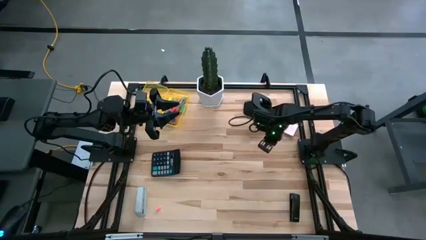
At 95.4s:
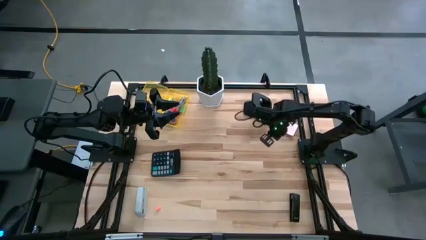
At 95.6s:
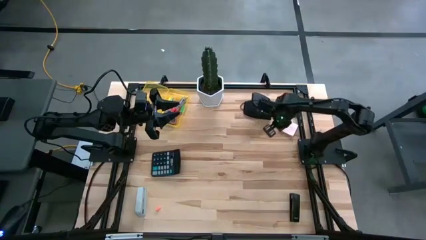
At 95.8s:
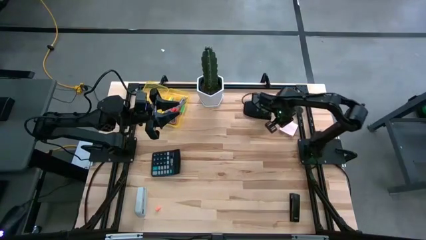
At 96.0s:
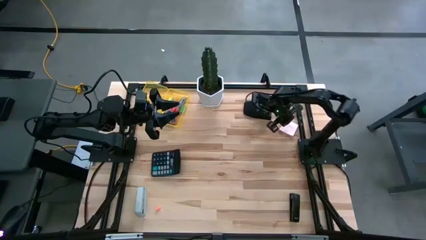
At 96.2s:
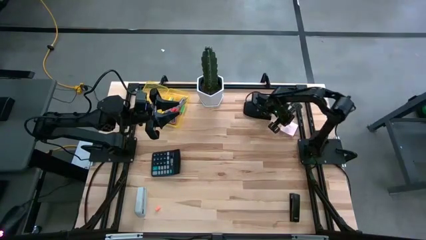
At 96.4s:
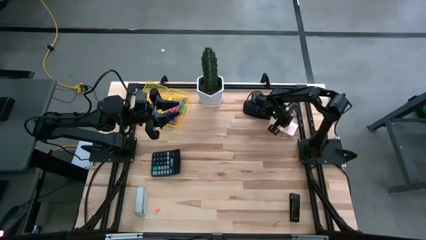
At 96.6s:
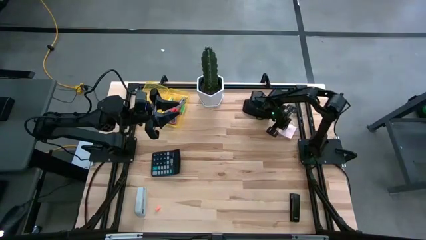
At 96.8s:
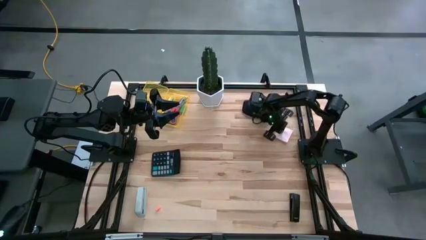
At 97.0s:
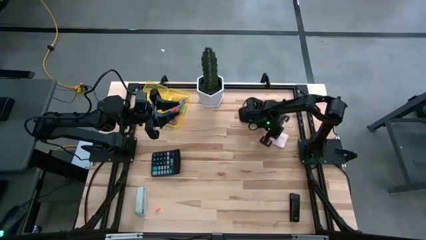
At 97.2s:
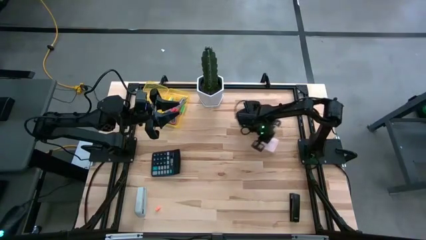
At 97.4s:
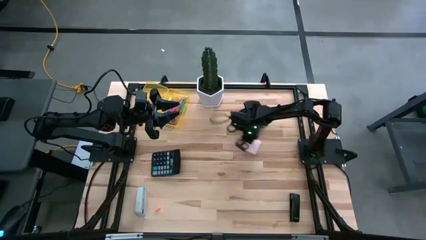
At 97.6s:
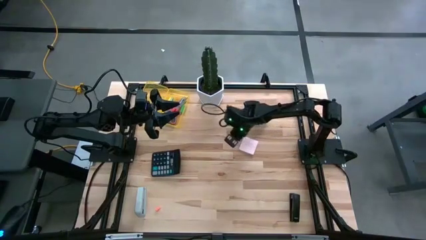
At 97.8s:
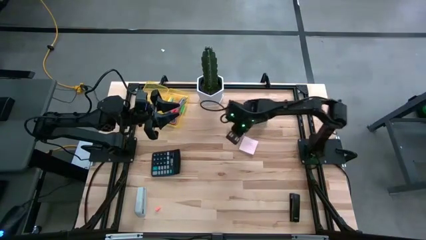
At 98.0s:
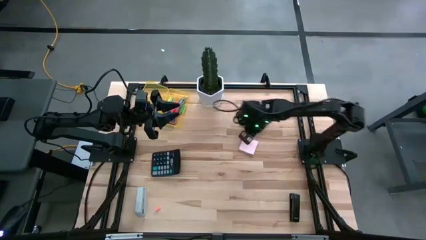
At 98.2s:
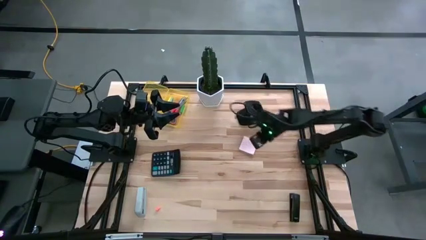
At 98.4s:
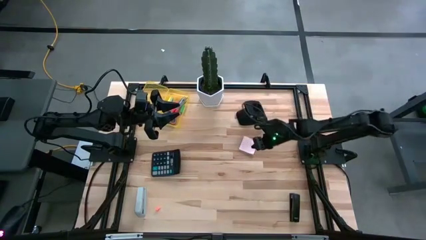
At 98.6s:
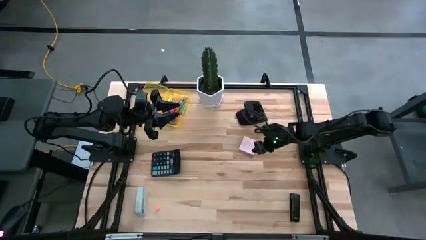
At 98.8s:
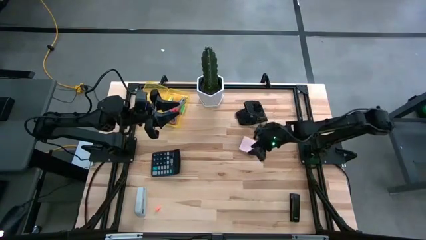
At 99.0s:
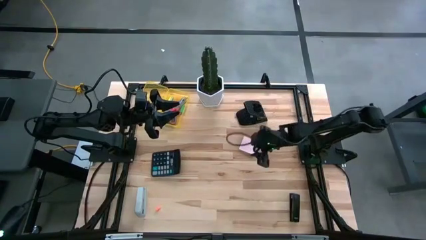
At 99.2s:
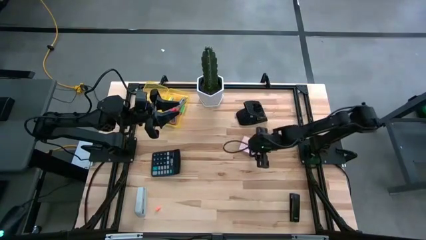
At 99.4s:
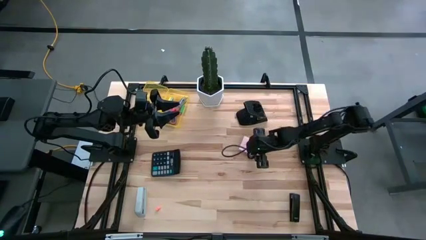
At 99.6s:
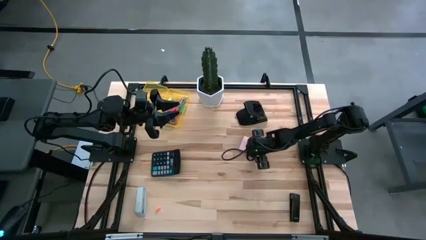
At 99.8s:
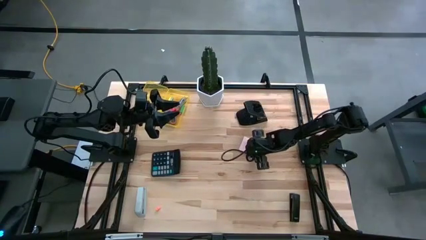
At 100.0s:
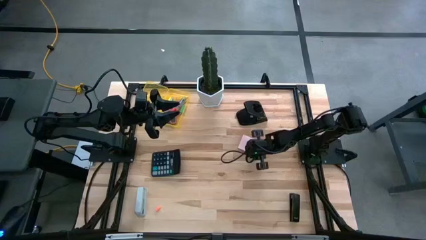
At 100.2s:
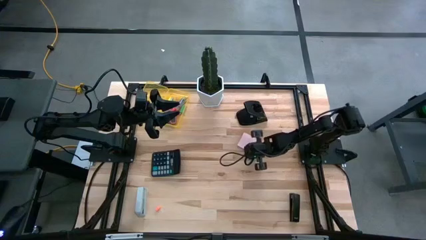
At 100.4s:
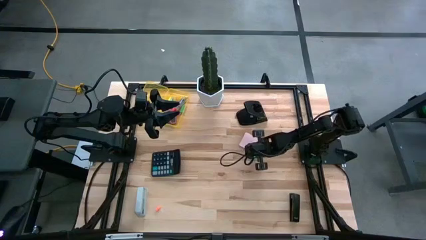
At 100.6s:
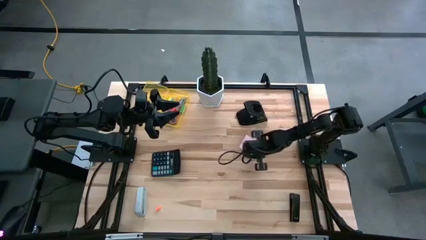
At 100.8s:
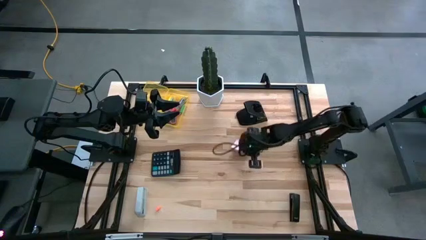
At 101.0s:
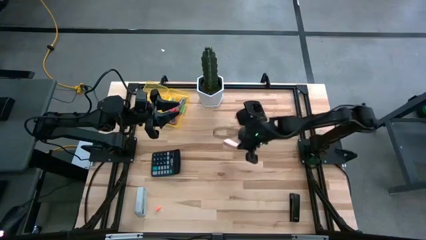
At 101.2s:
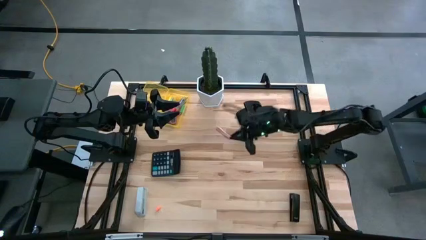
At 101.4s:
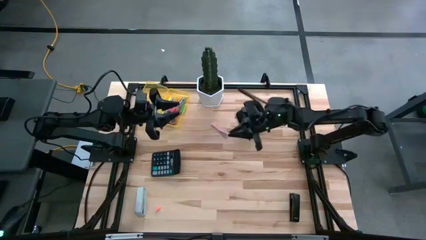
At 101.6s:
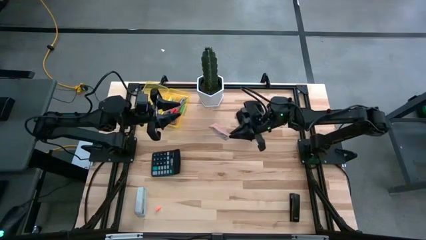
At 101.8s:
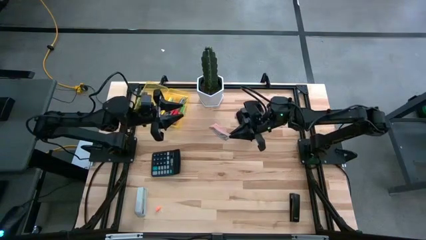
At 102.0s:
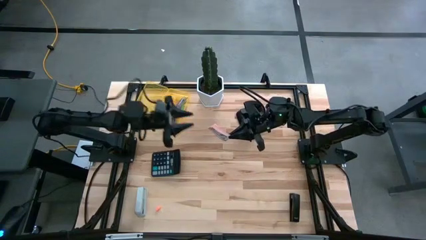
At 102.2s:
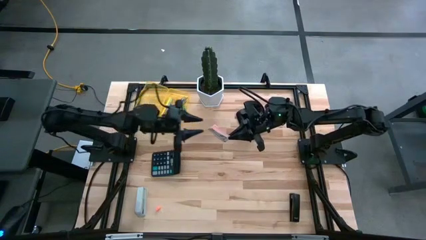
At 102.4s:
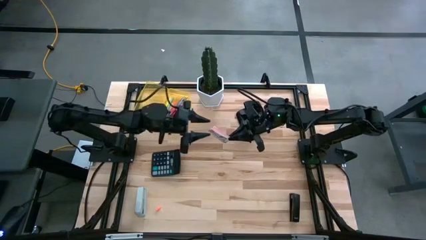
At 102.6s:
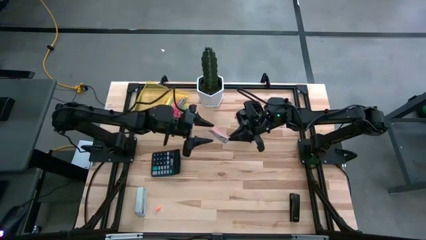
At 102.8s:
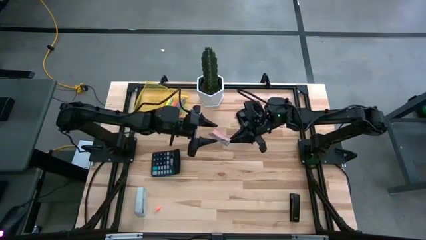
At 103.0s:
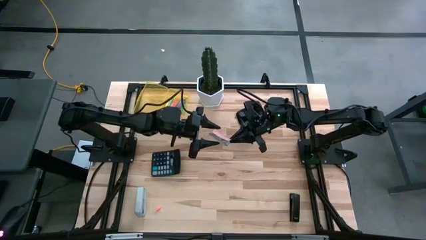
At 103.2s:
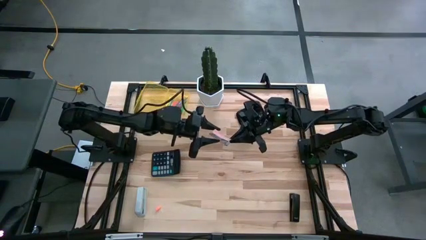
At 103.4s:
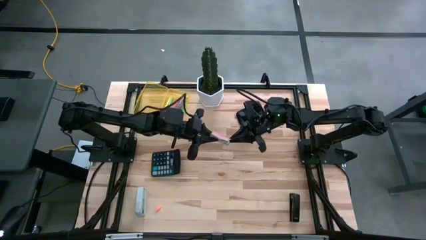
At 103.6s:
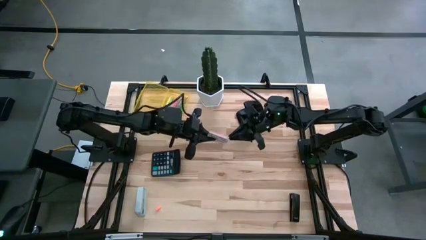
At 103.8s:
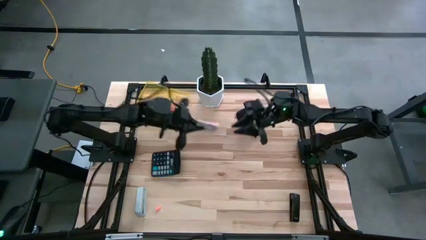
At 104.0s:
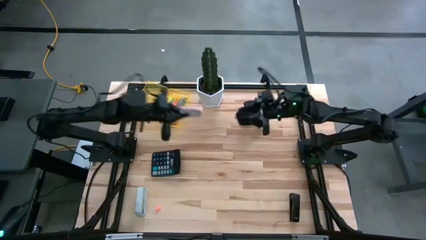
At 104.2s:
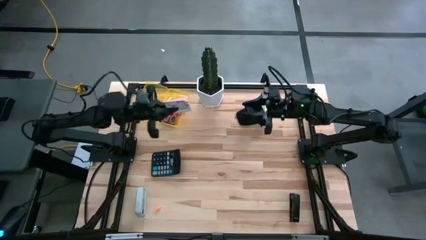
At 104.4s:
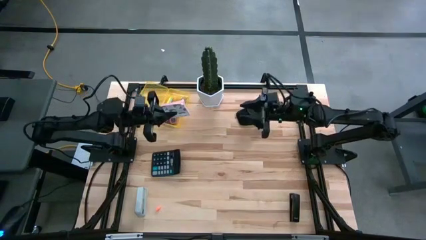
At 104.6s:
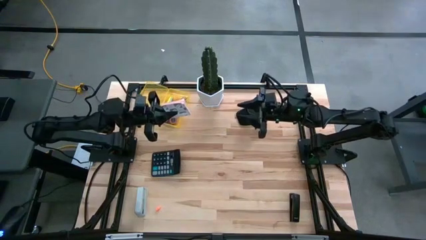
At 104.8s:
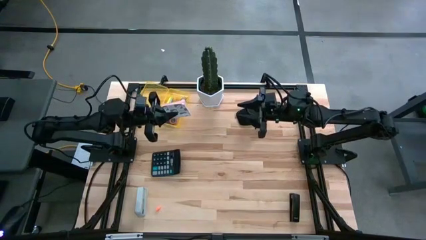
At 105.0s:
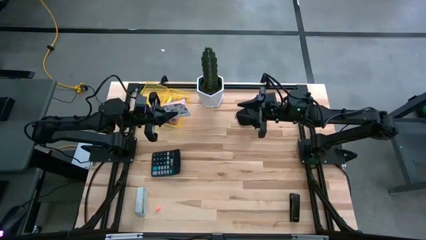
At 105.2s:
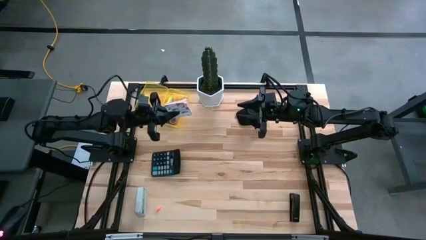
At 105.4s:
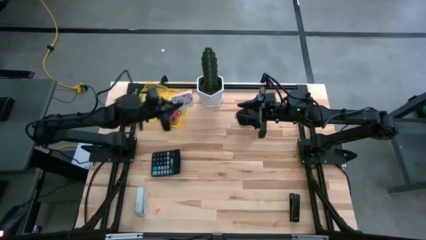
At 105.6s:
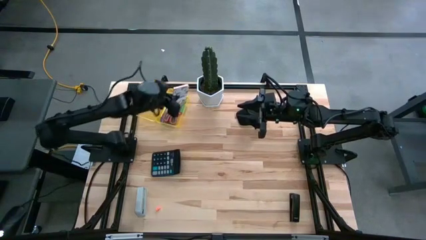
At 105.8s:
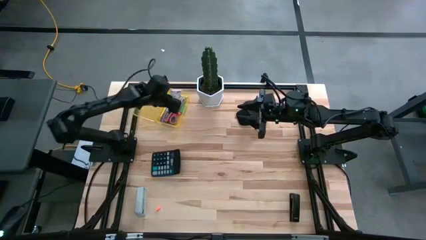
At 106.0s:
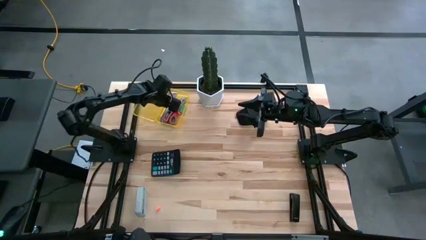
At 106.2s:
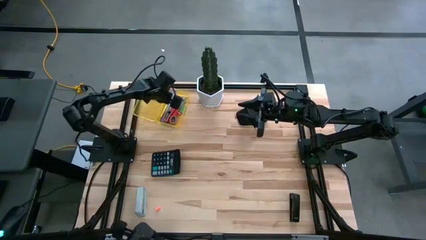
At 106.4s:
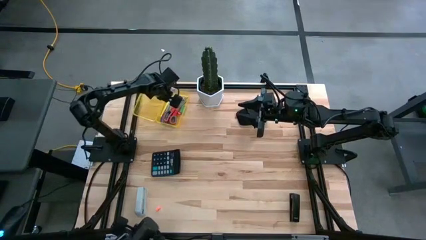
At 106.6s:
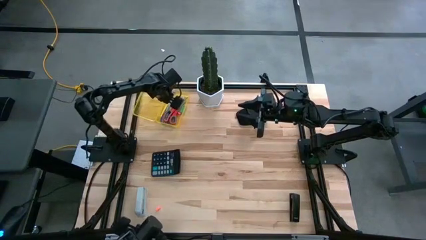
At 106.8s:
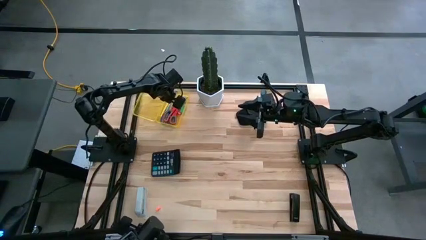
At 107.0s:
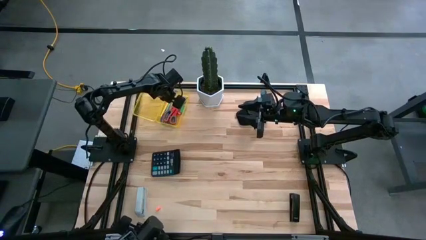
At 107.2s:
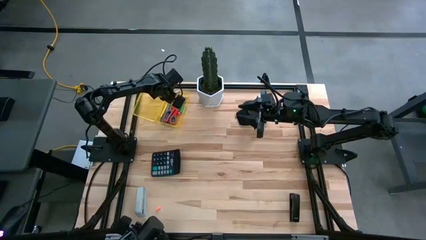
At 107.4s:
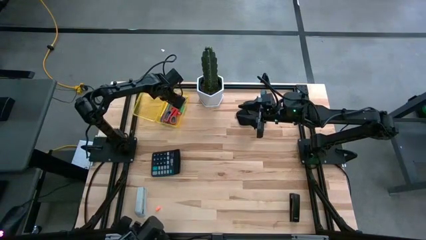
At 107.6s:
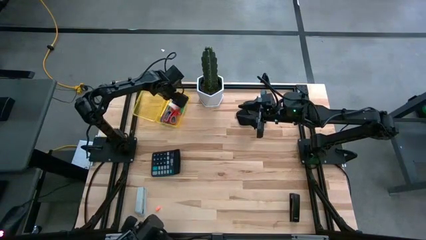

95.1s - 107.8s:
Task: Pack school essentials
Put the sticky notes into the transparent yellow supply box
